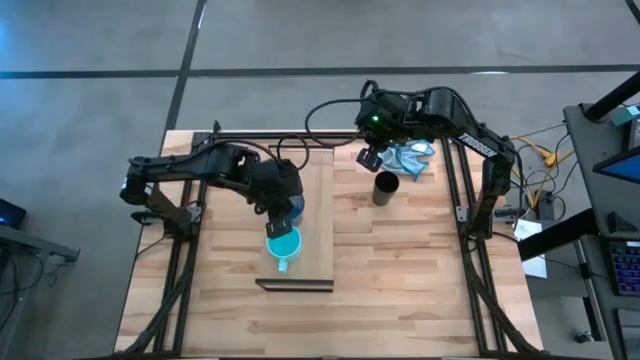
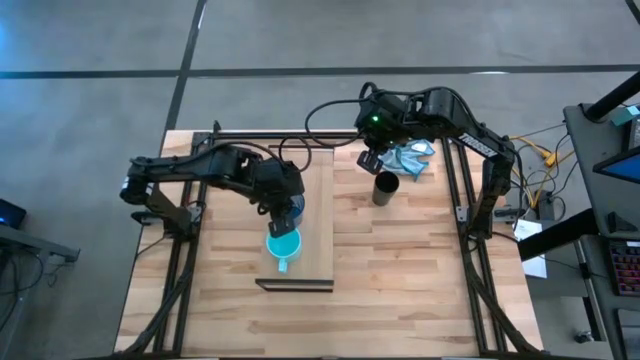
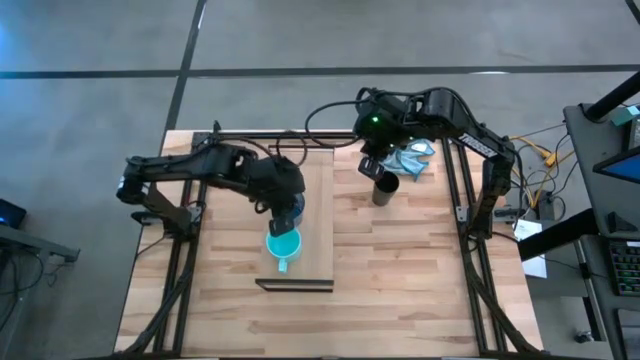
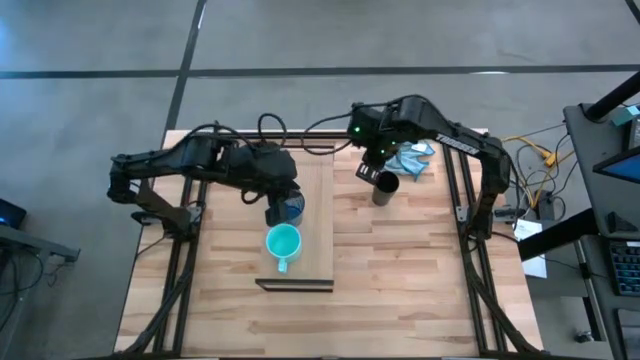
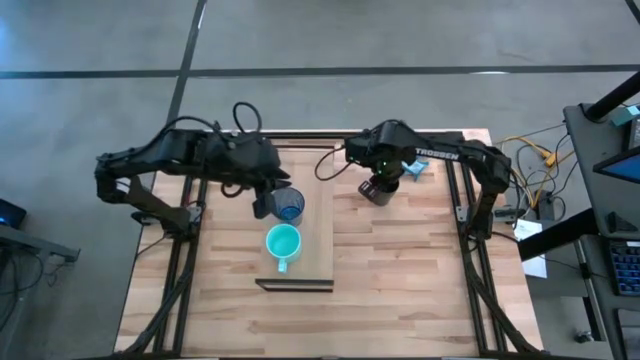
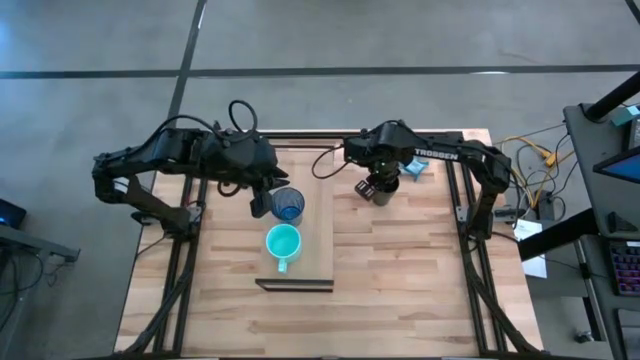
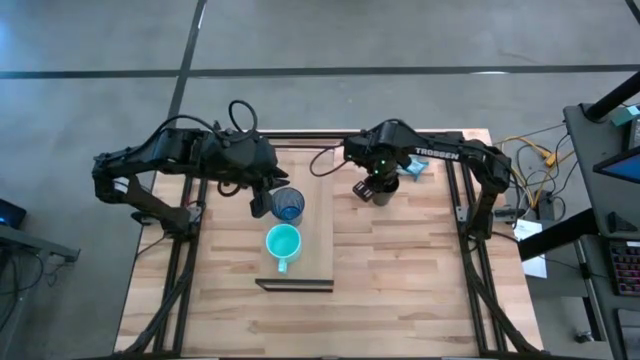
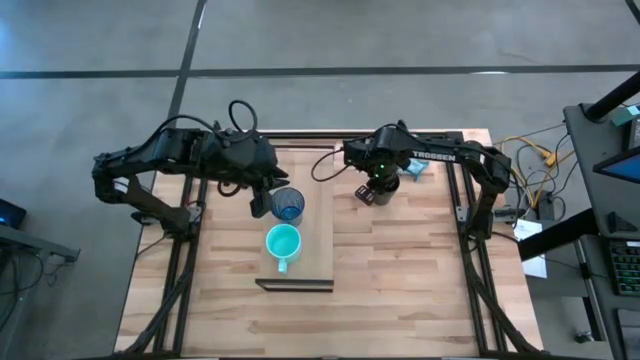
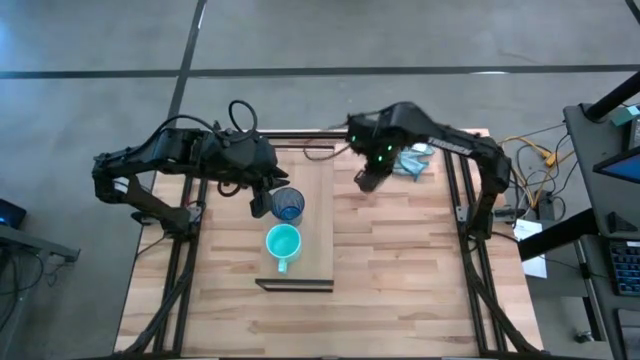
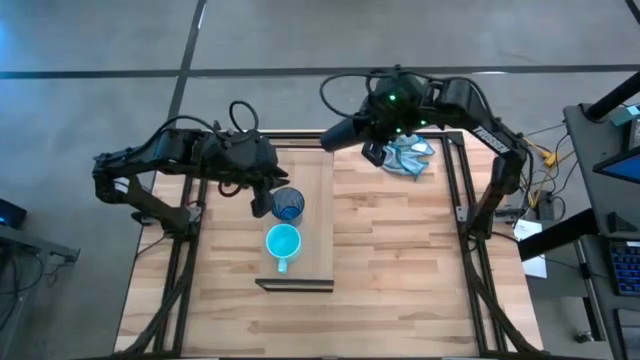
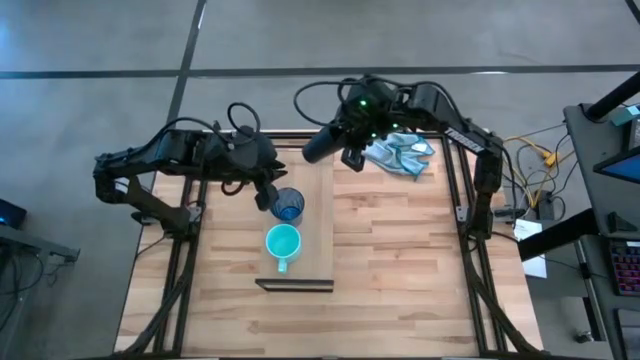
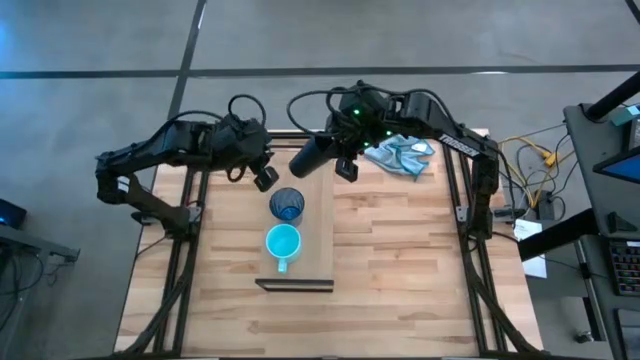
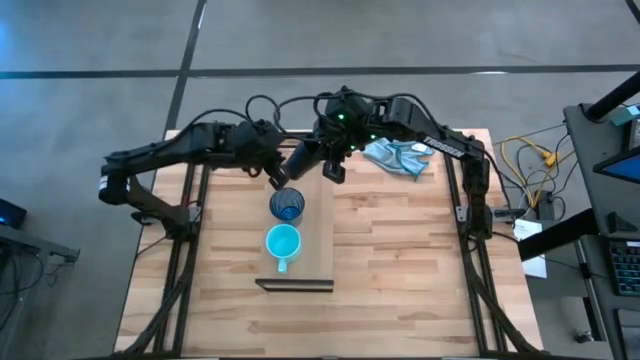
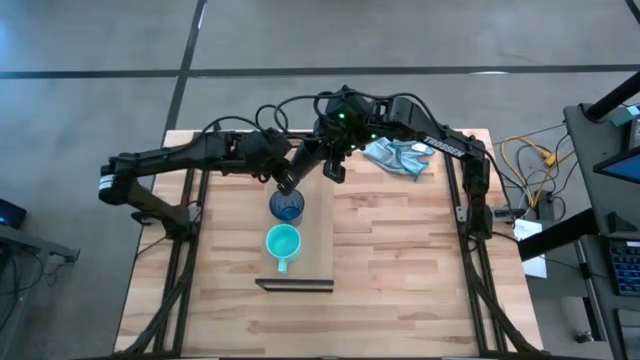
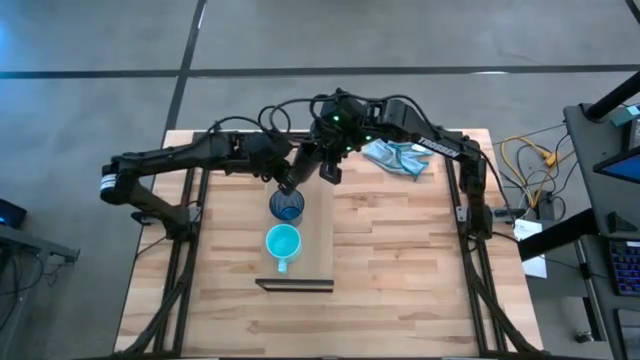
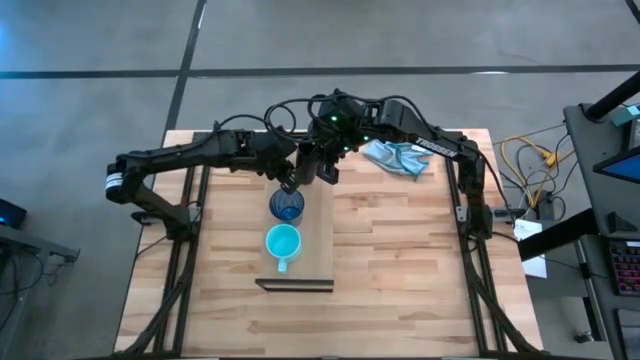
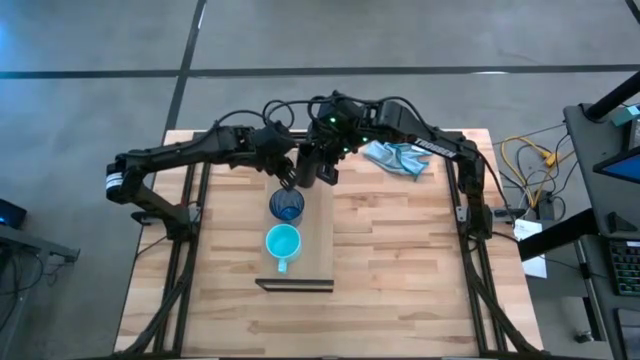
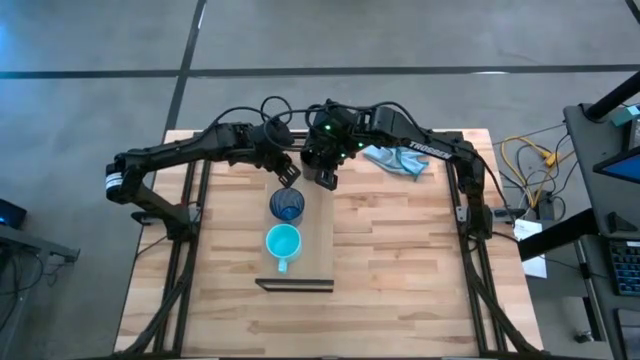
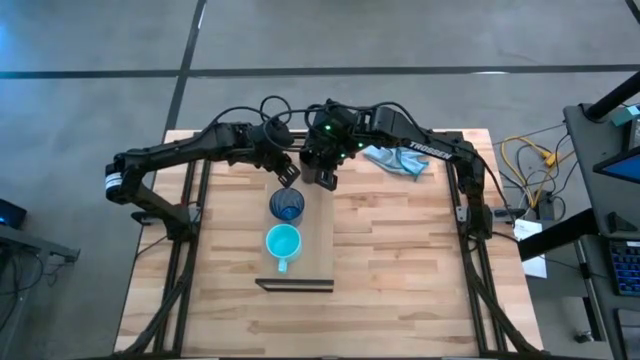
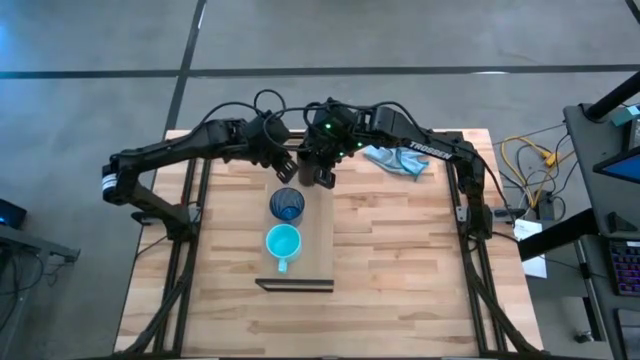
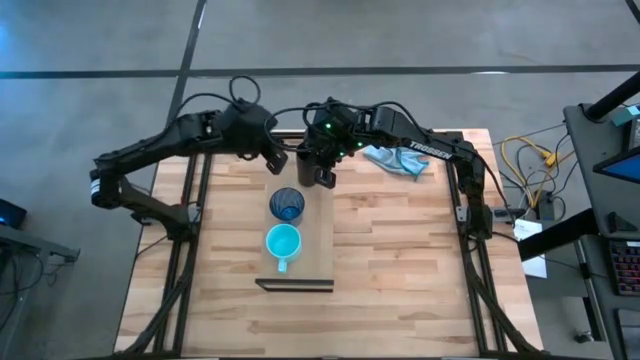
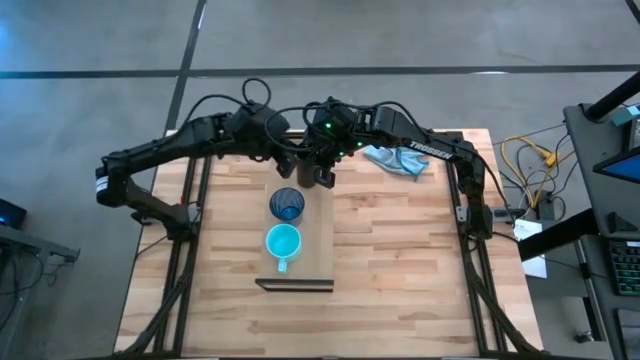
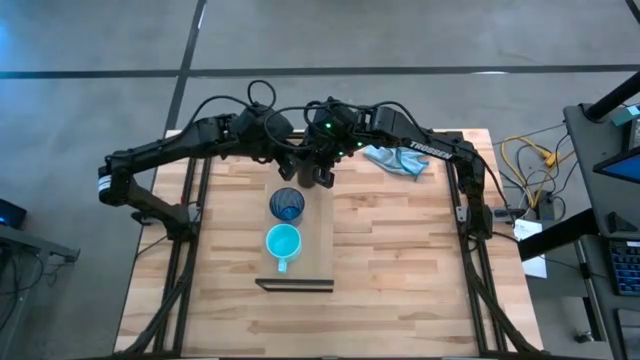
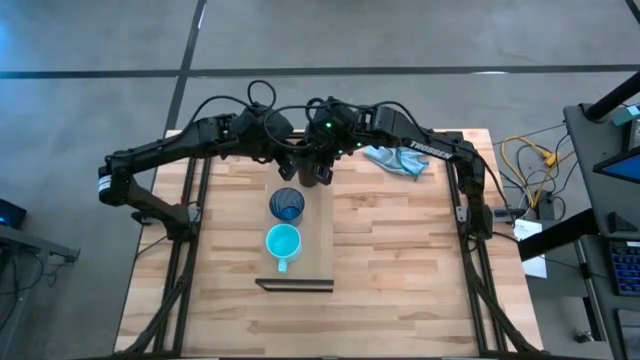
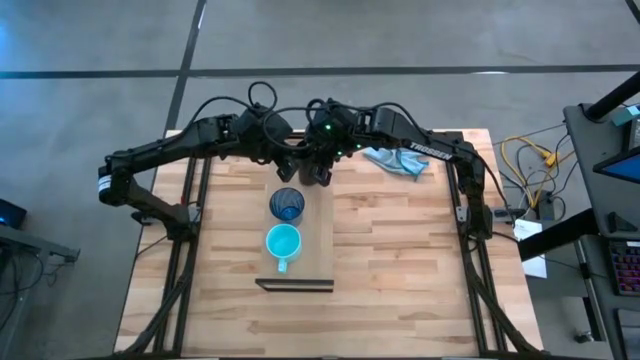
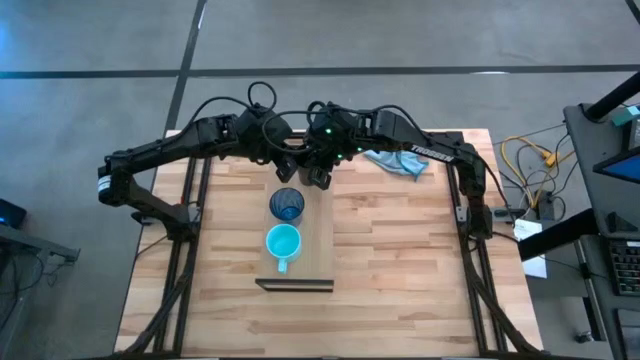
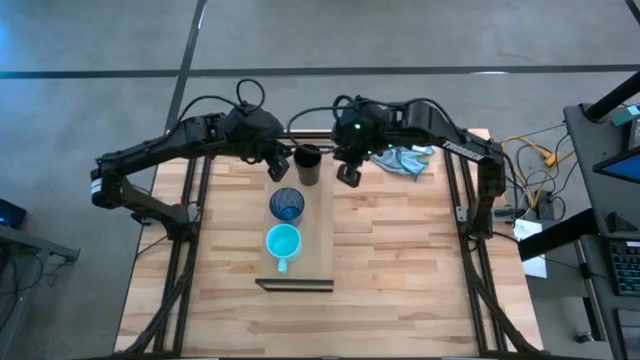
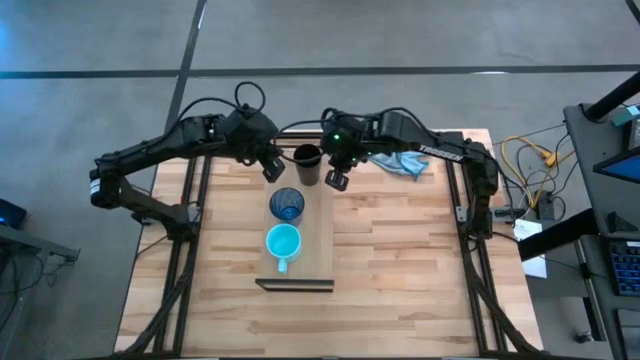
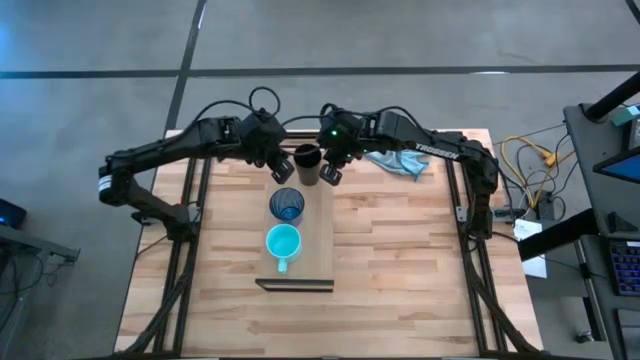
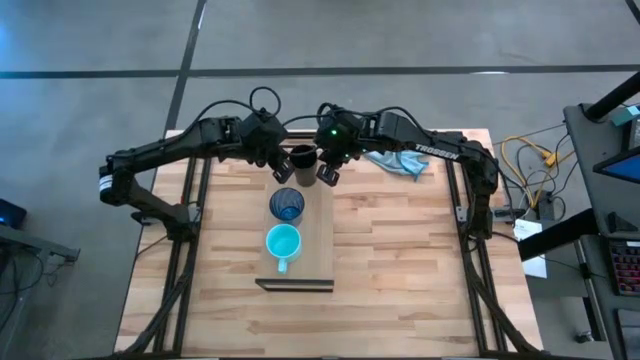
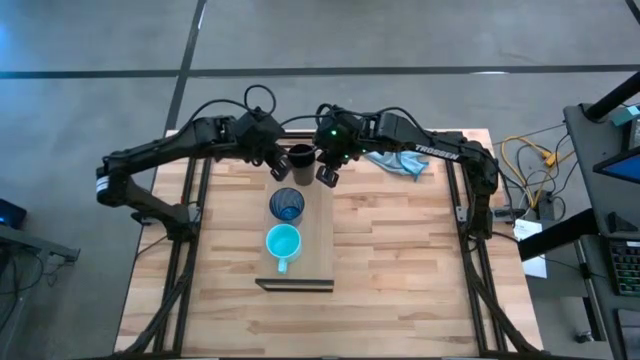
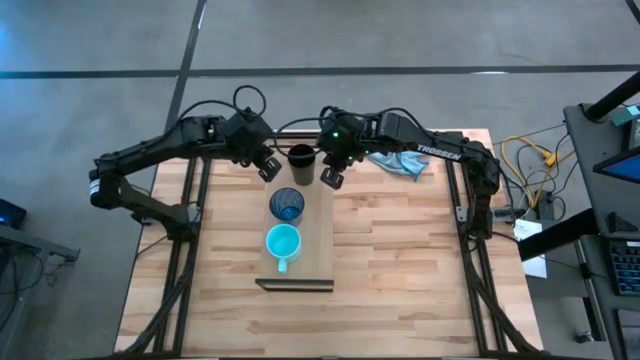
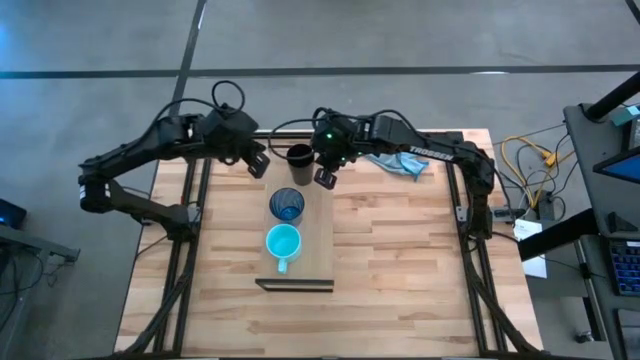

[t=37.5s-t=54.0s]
Task: Stack small to large cups/mugs on shelf
Put the black cup on the shelf

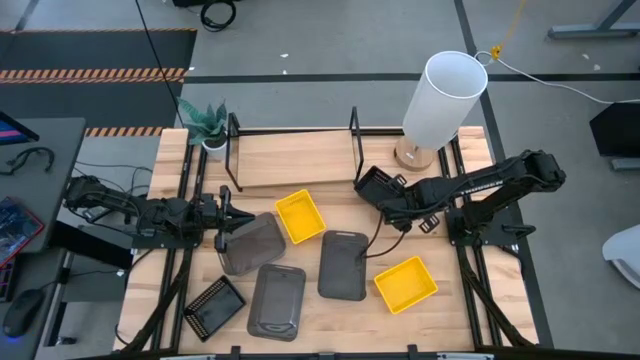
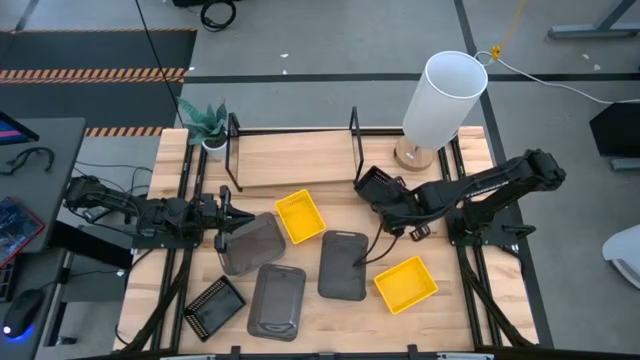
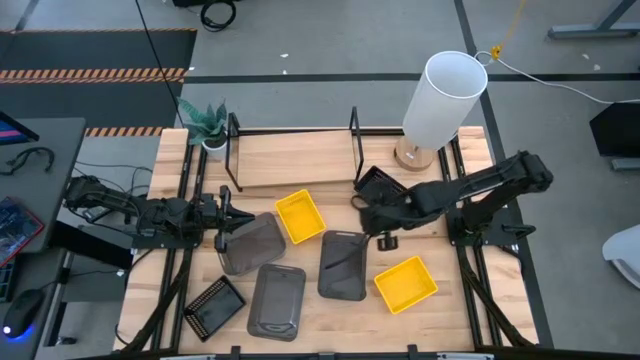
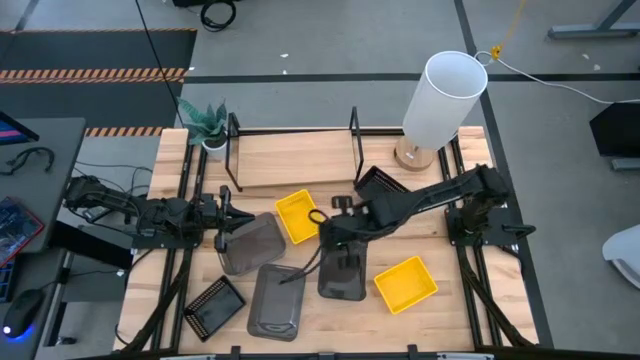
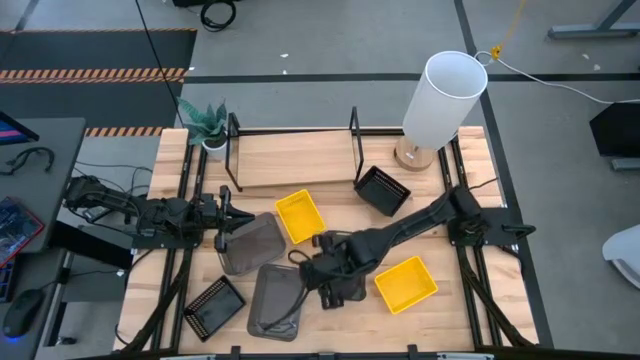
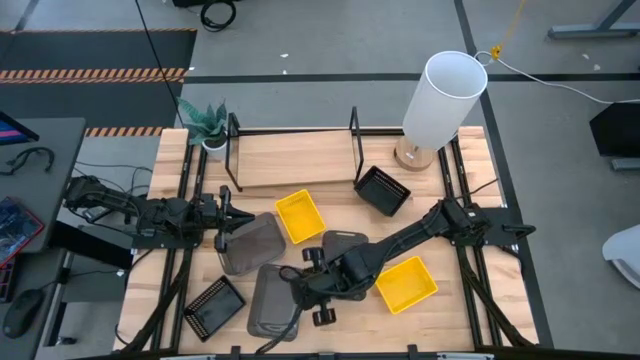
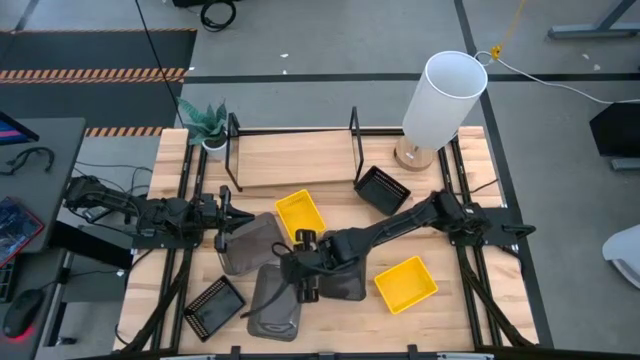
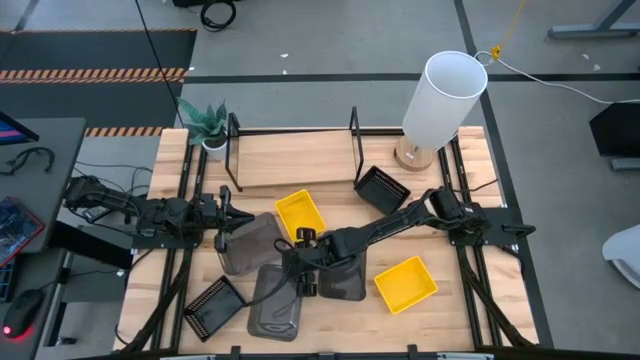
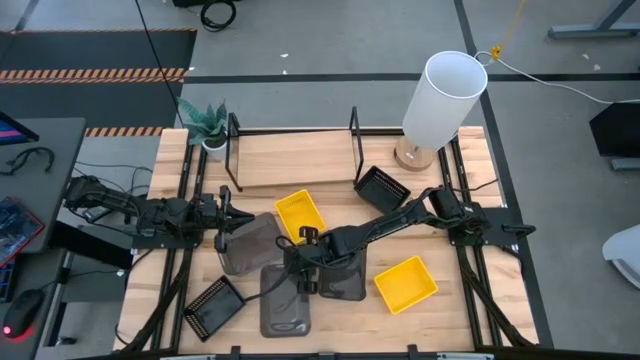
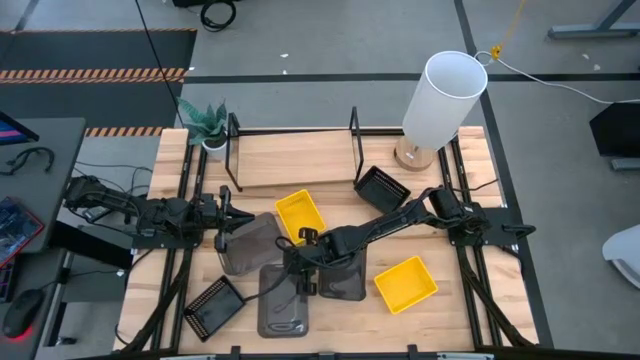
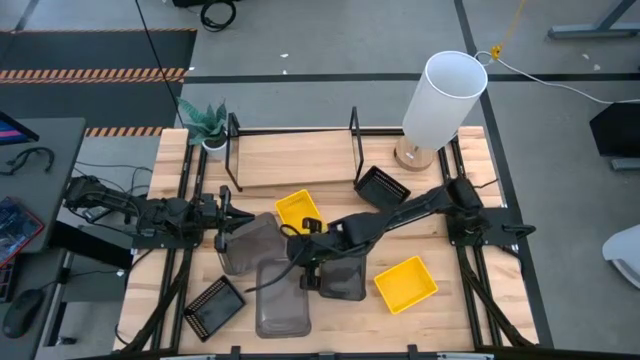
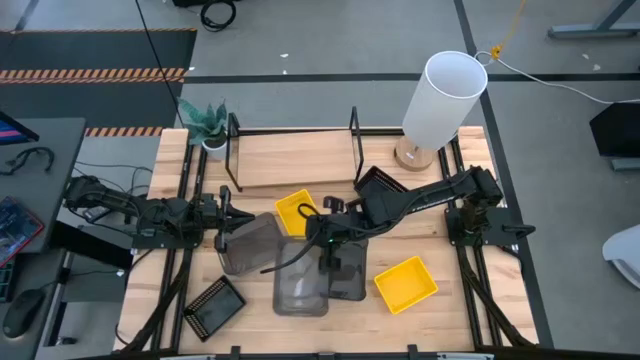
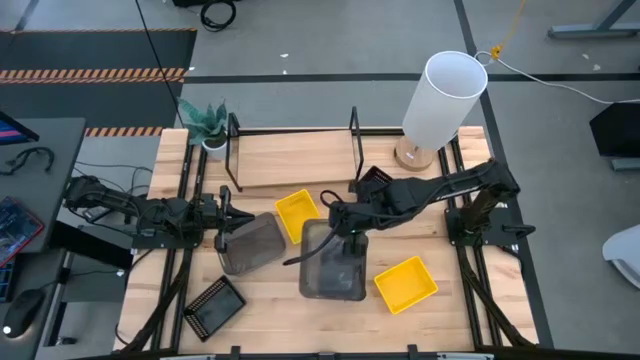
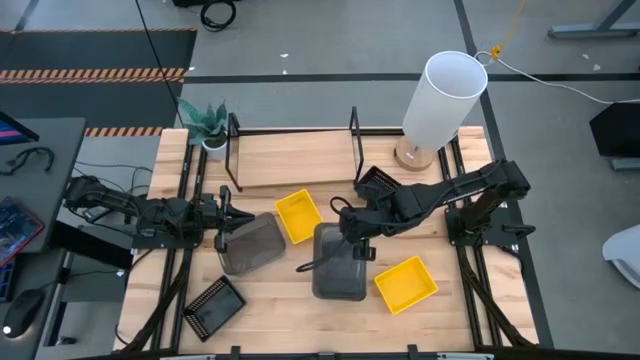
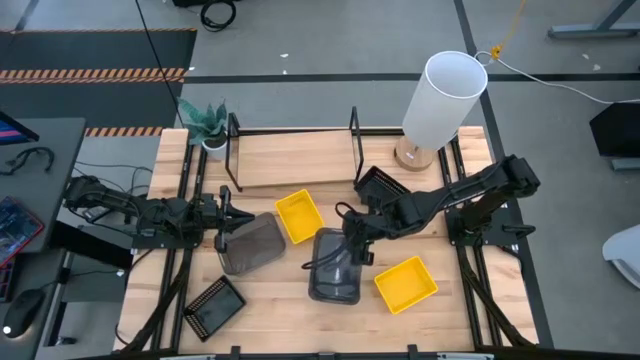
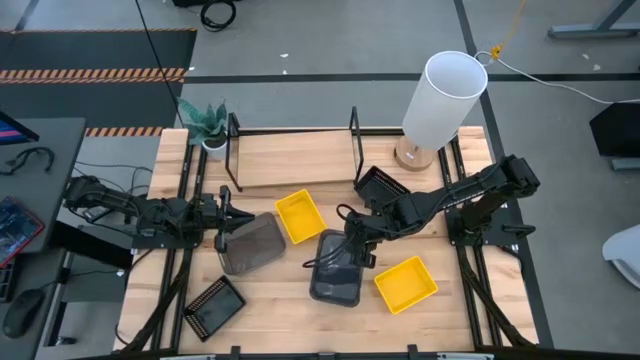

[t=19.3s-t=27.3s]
Task: Stack baskets on shelf by color
Stack the bottom gray bin on top of the gray bin
